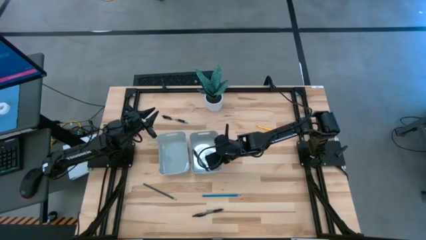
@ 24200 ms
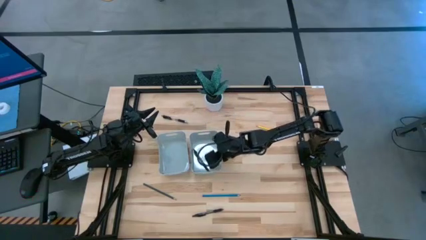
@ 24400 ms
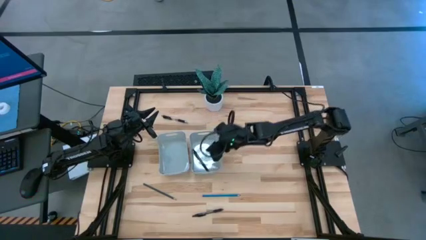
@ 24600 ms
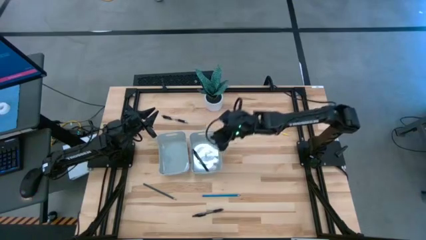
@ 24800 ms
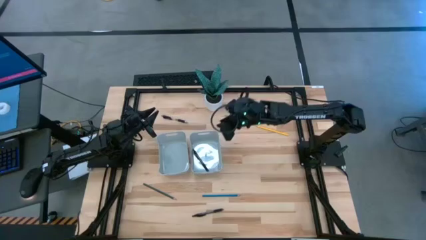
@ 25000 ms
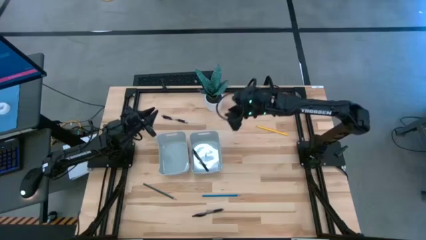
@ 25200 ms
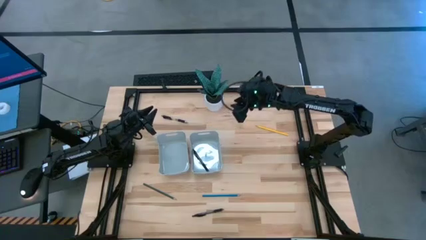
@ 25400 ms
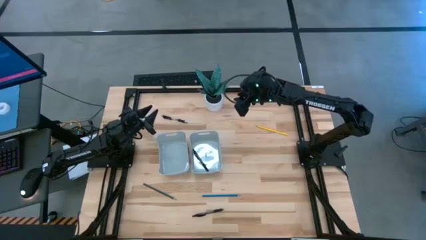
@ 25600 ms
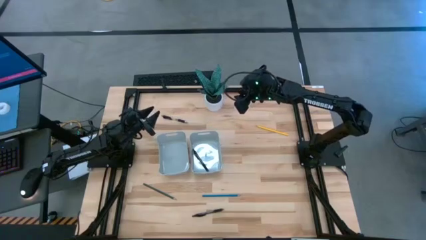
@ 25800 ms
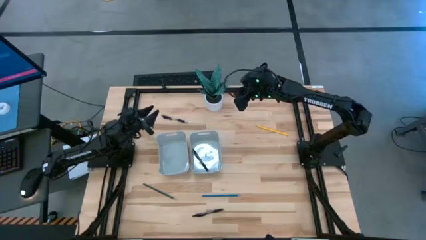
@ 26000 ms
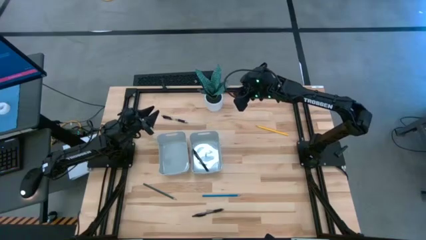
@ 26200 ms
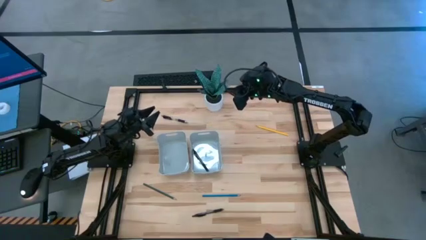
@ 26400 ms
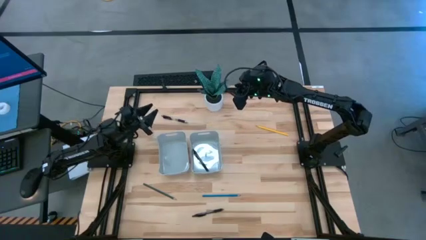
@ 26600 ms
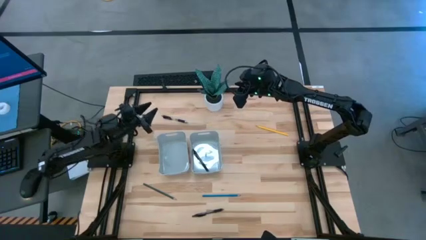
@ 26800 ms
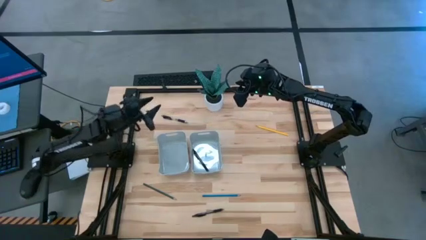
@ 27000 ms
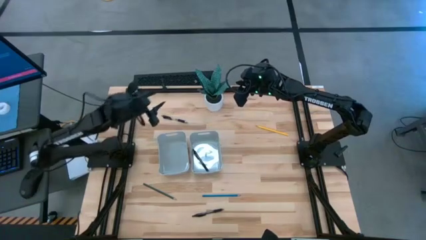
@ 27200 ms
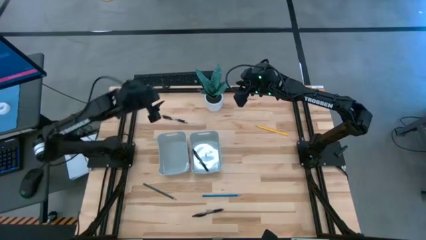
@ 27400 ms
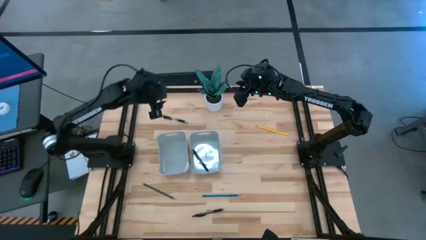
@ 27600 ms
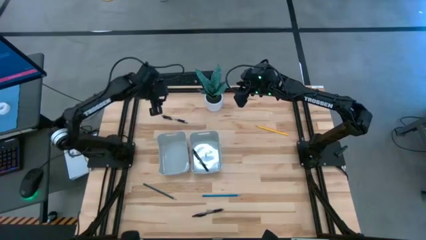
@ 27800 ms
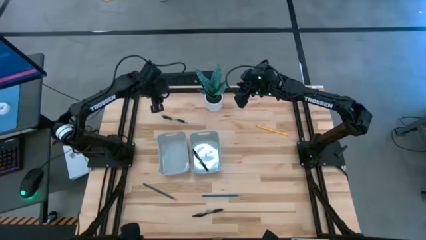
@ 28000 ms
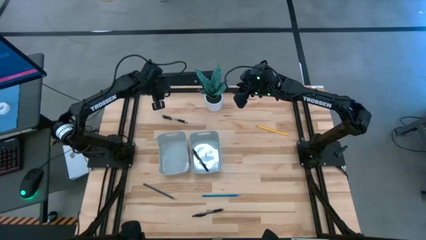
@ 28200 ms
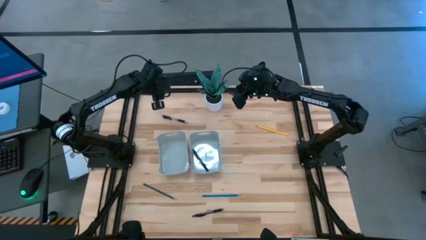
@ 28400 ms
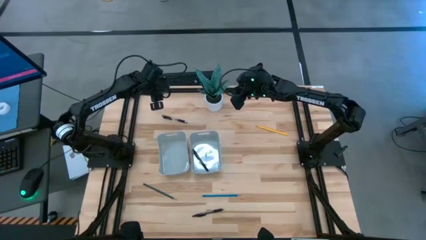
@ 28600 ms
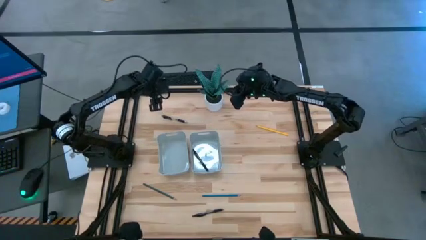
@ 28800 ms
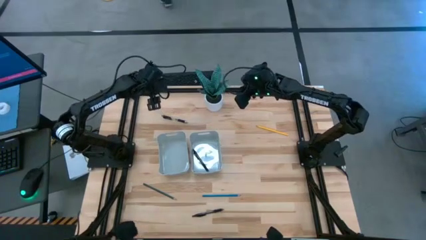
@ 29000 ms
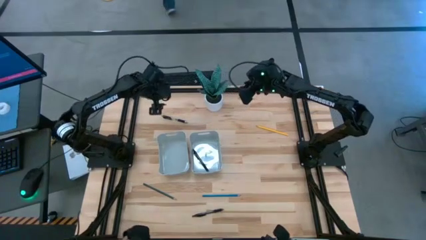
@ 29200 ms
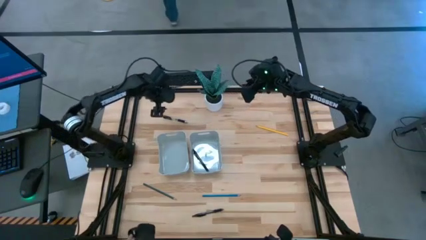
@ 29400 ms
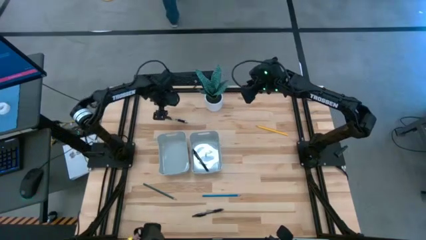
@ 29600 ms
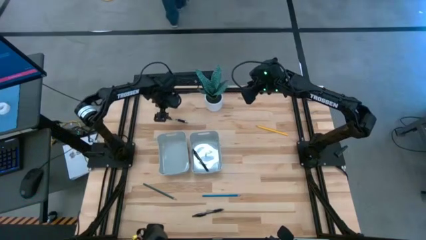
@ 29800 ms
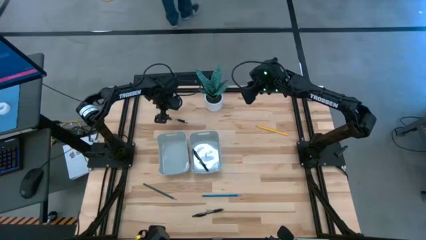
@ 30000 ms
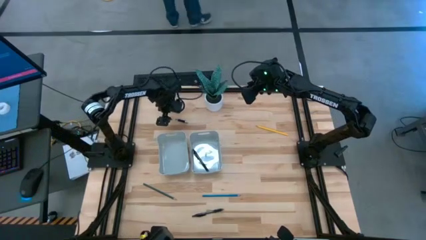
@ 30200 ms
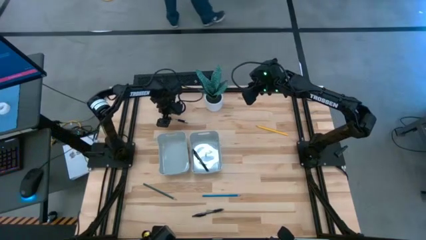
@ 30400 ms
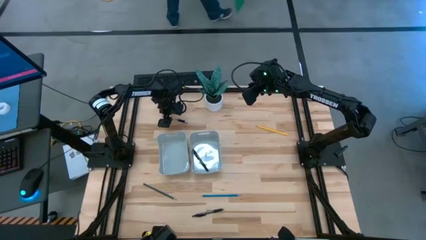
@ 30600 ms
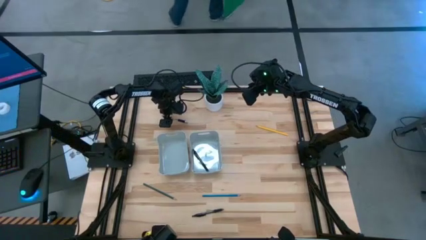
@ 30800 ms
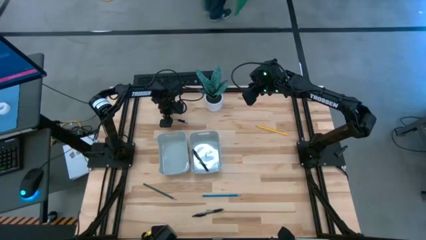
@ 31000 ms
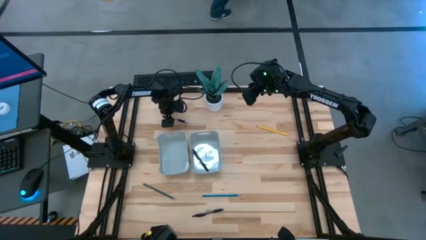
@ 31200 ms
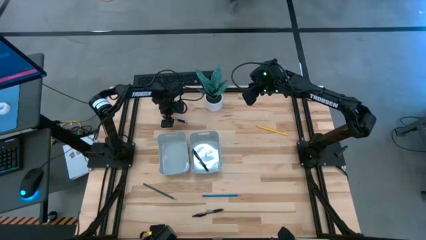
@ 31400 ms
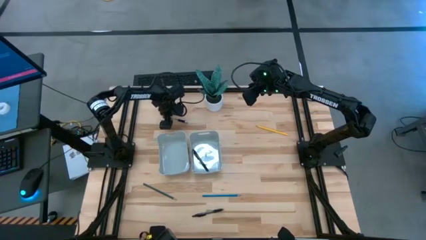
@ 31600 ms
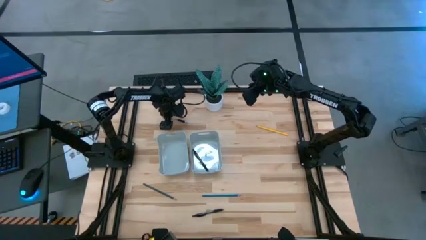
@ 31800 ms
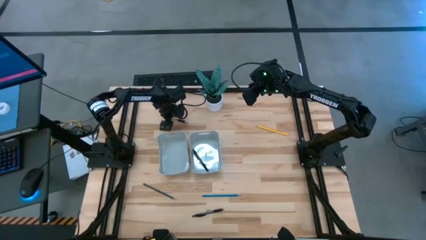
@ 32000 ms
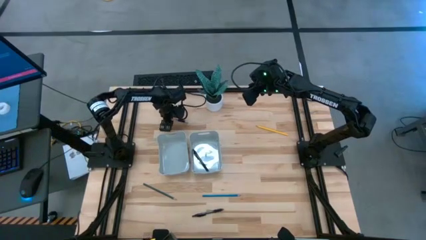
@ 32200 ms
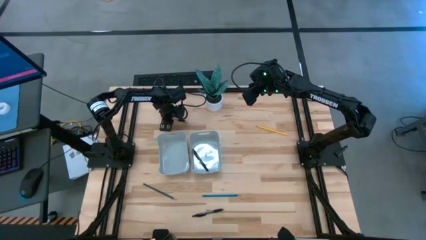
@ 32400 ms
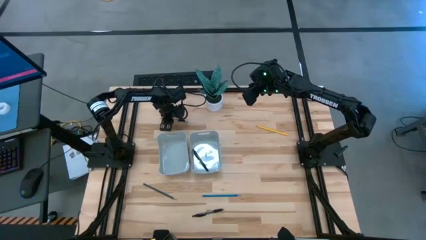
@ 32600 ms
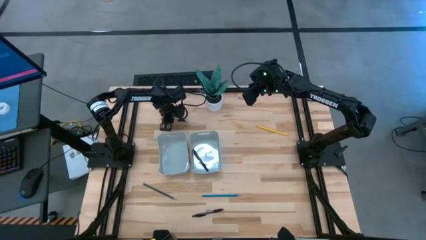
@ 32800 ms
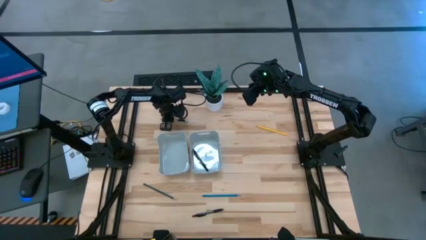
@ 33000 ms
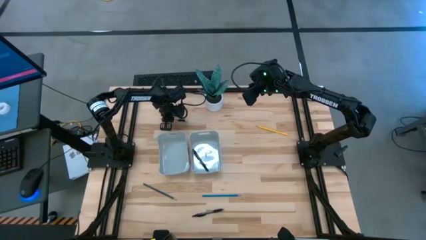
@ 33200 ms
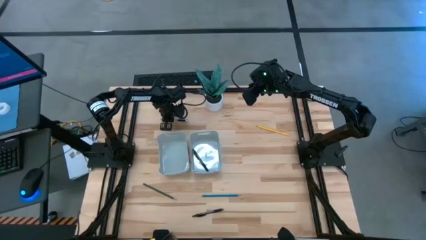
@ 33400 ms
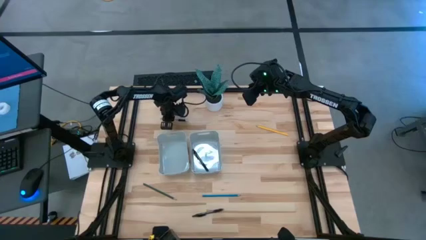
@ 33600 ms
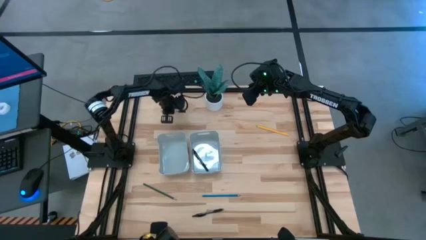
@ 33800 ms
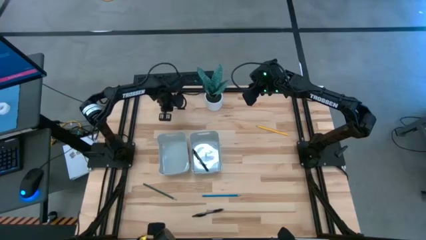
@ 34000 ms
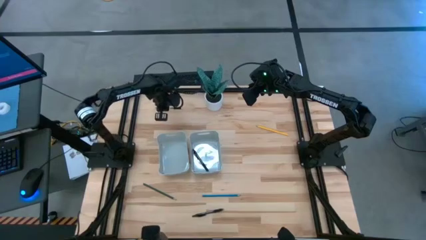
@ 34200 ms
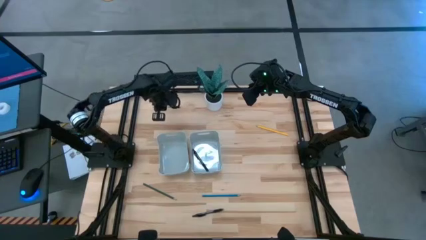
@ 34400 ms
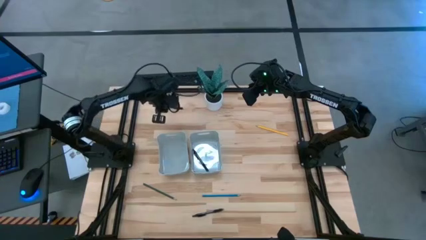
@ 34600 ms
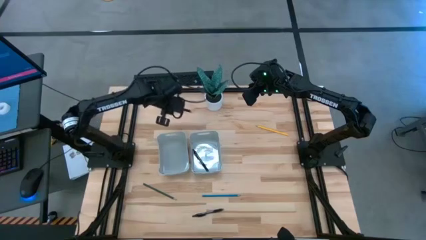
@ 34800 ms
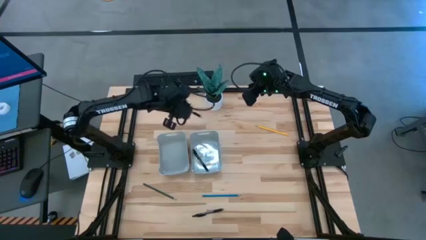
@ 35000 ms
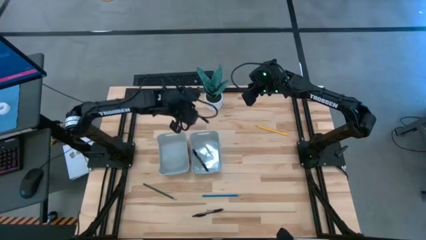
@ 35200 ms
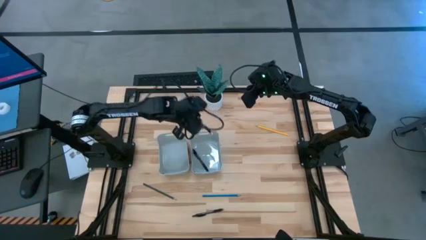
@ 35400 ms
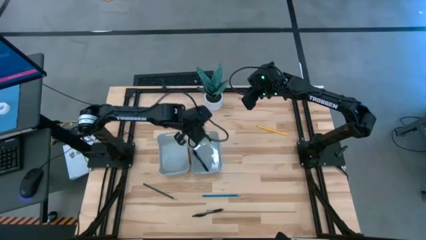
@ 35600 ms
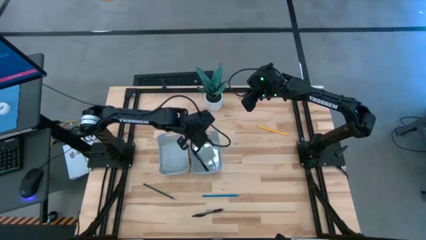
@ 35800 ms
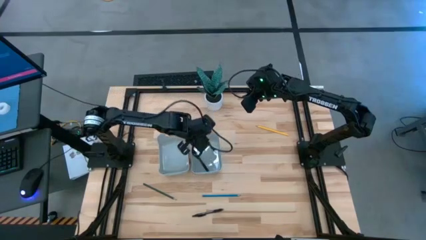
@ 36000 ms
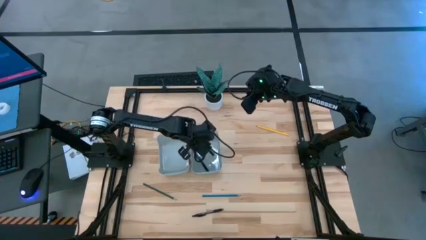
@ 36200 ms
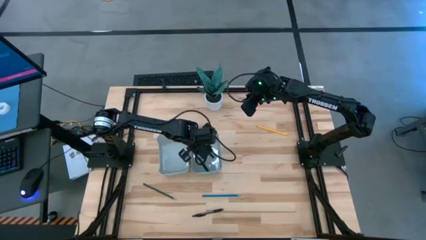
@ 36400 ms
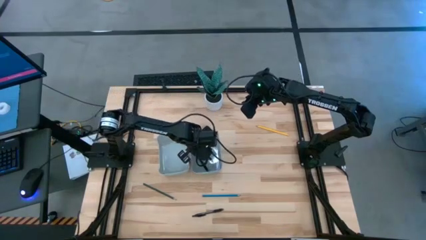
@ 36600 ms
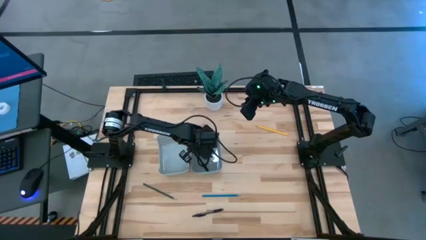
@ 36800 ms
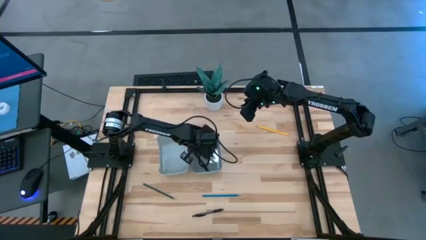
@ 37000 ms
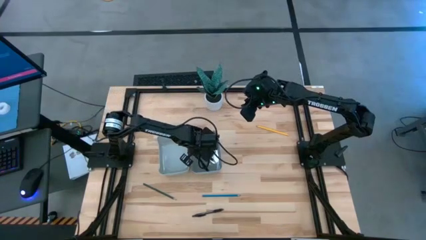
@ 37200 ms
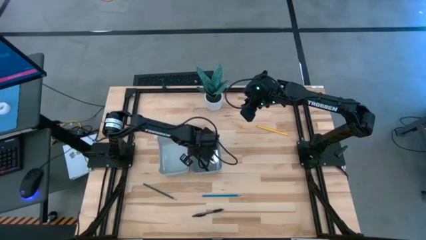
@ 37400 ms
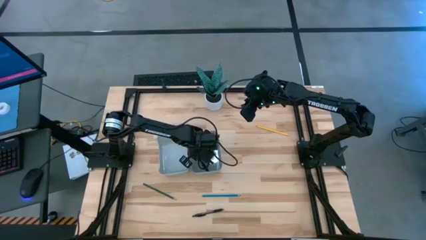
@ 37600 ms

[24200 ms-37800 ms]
Task: Sort pens & pencils
Put the top black pen into the right gray bin

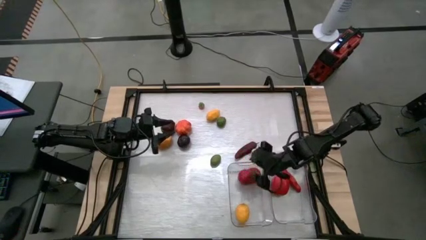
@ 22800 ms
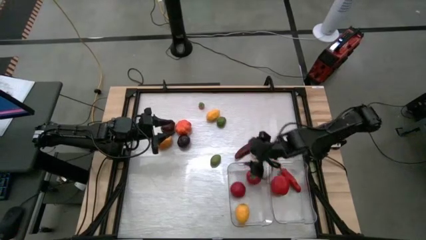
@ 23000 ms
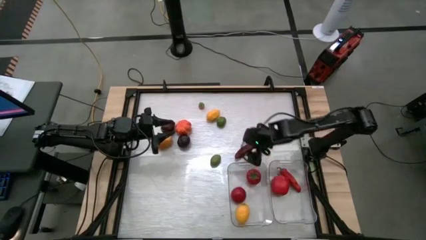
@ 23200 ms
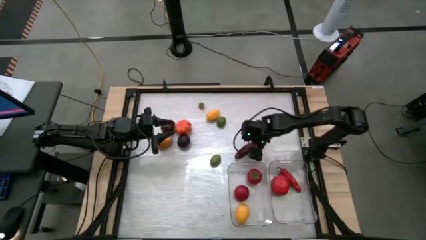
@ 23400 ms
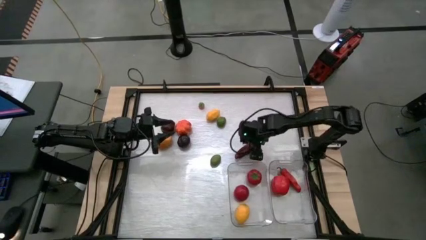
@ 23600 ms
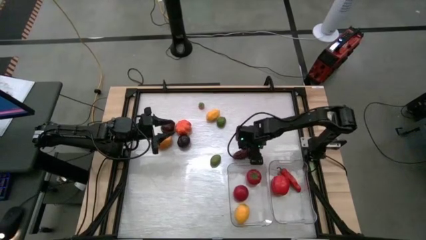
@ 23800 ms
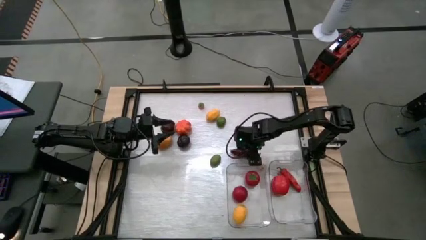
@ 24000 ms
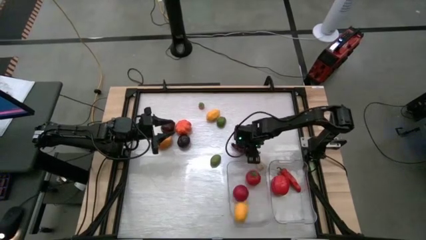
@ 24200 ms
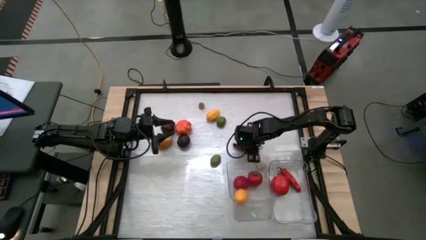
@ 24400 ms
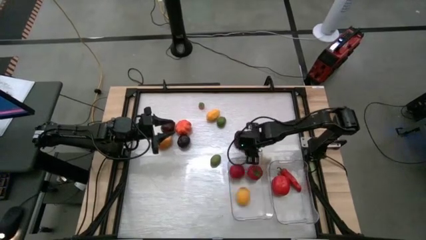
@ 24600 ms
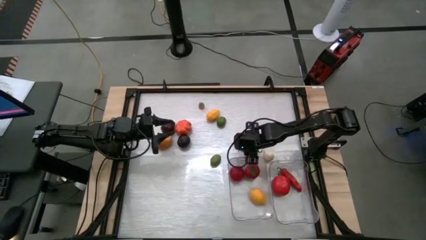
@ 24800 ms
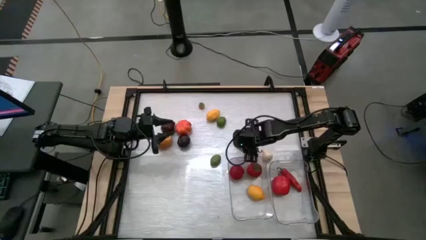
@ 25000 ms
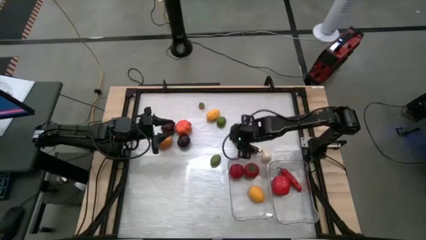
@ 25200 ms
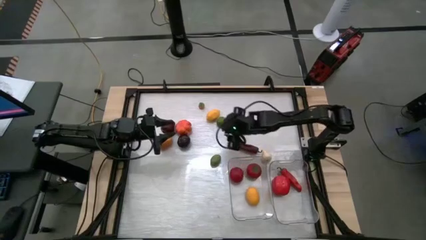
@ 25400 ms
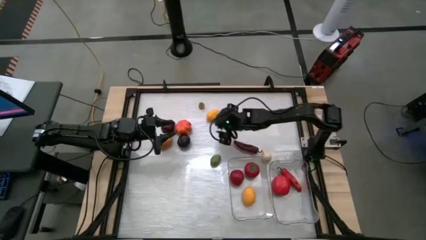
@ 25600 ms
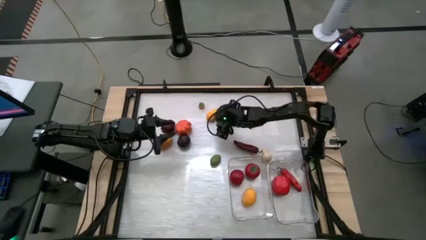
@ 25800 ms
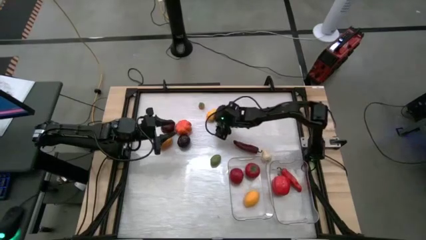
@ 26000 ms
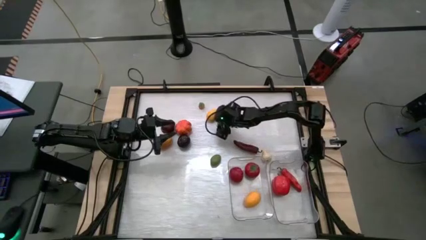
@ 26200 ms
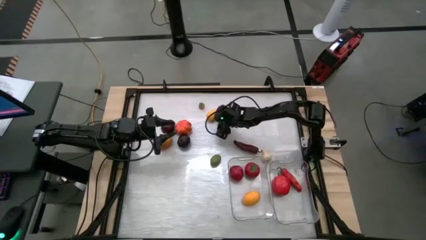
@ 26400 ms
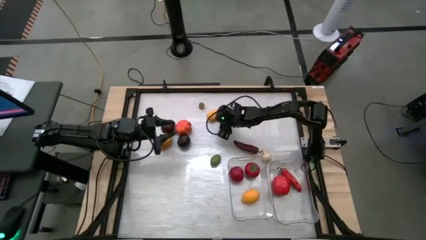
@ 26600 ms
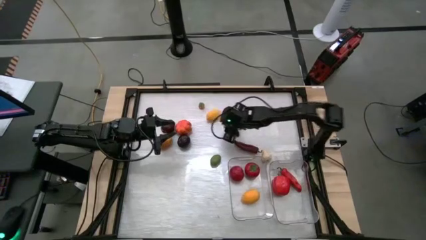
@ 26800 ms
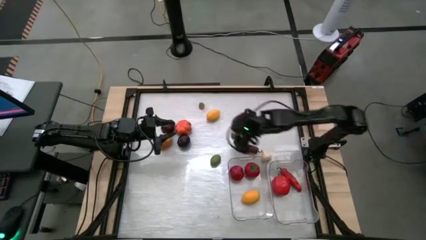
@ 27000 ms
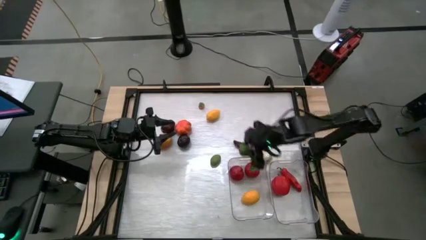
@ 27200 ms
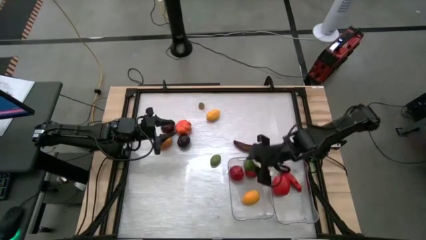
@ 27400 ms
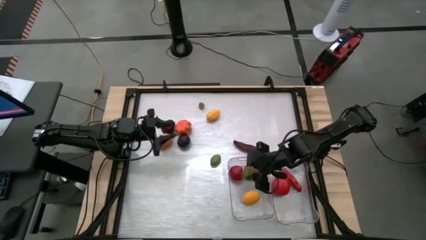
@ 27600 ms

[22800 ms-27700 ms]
Task: Sort produce into baskets
Put the top lime into the left transparent bin
